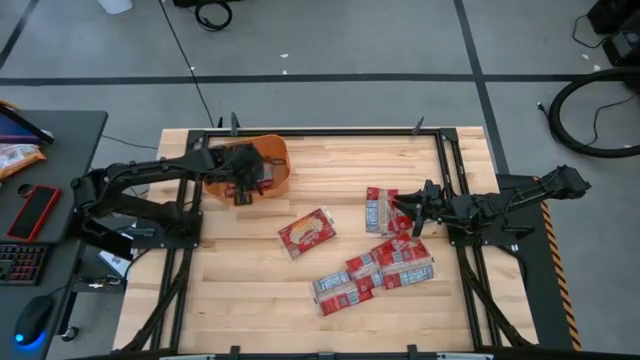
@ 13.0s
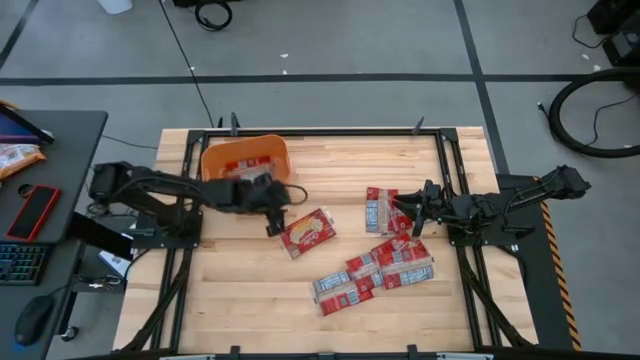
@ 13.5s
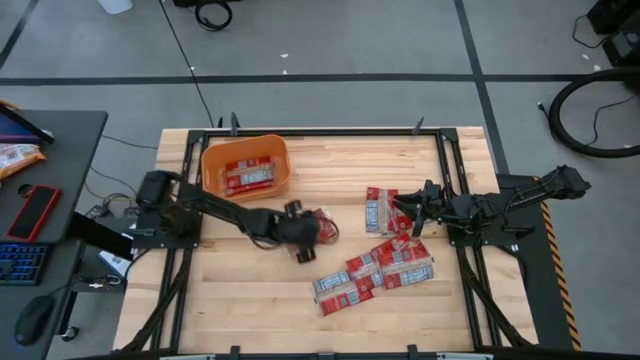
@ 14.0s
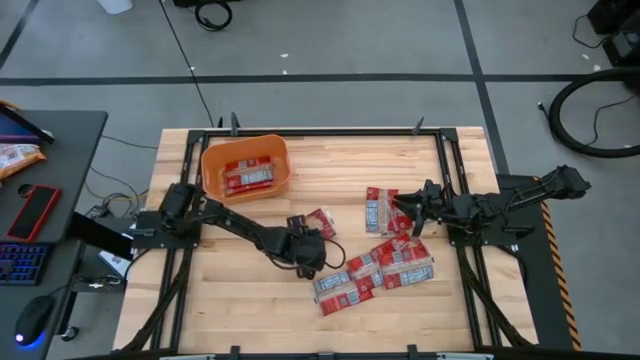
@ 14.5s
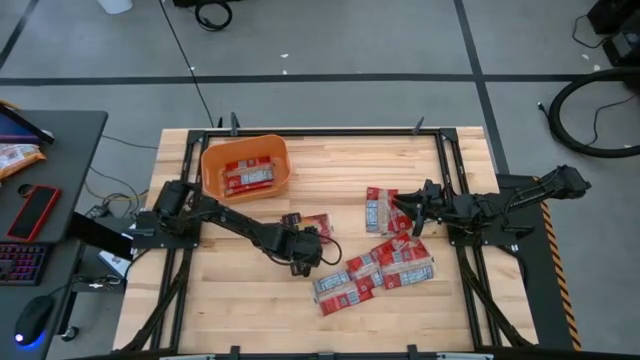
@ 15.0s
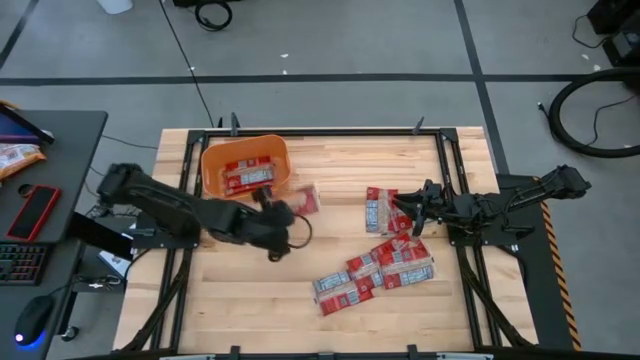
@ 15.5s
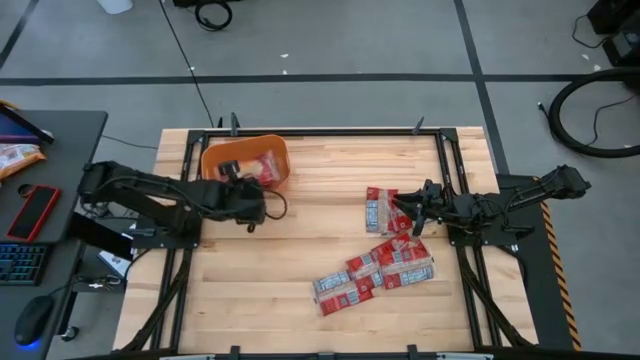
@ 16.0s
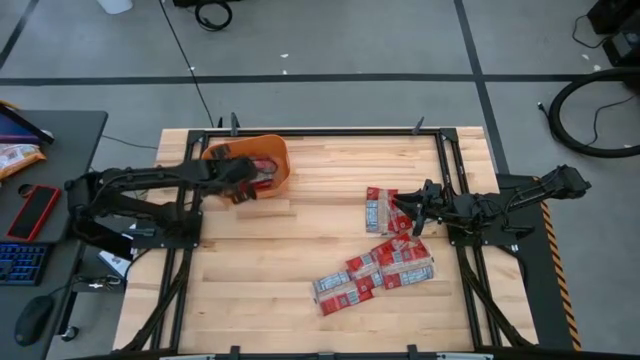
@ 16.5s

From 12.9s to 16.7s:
Task: Sort popcorn bags into baskets
Put the red popcorn bag into the orange bin

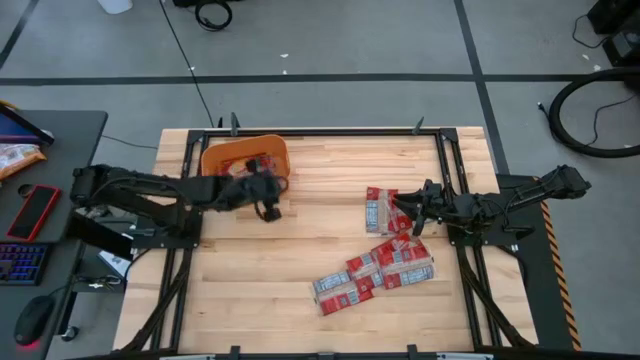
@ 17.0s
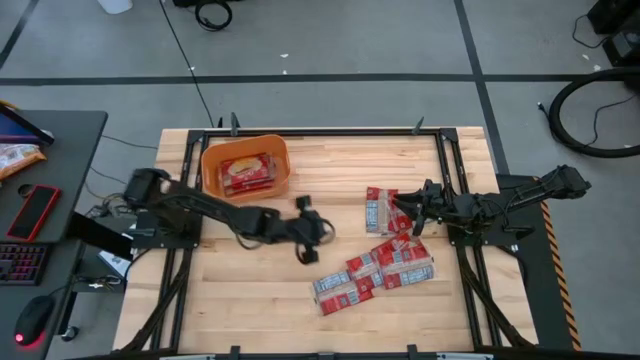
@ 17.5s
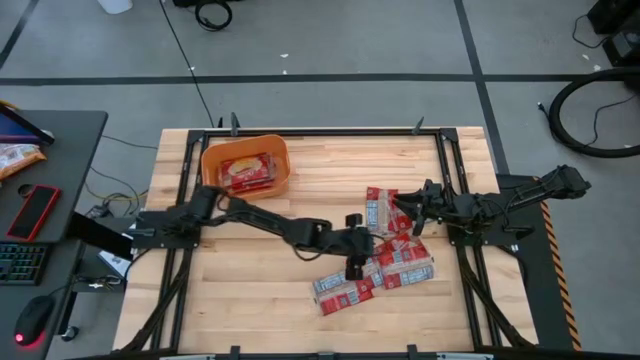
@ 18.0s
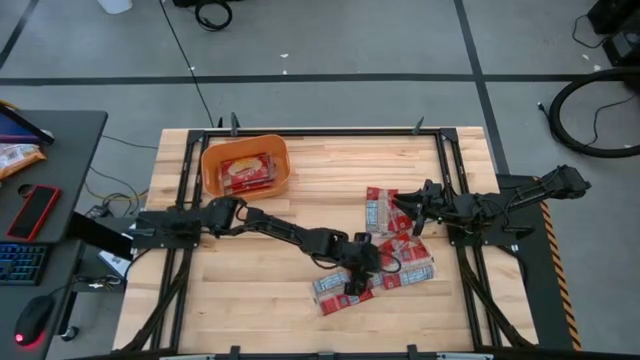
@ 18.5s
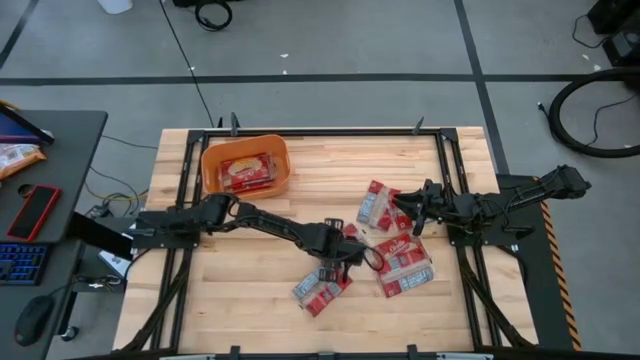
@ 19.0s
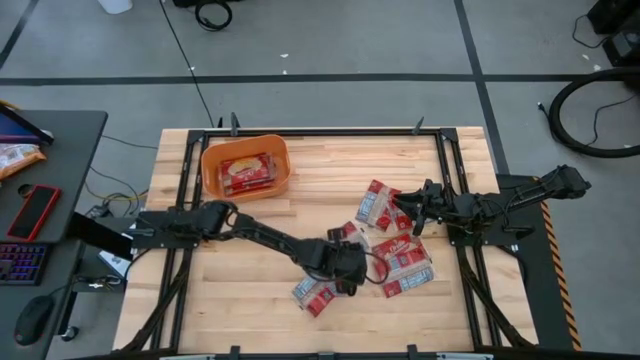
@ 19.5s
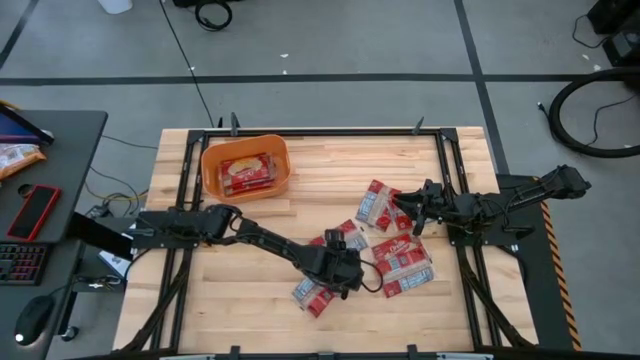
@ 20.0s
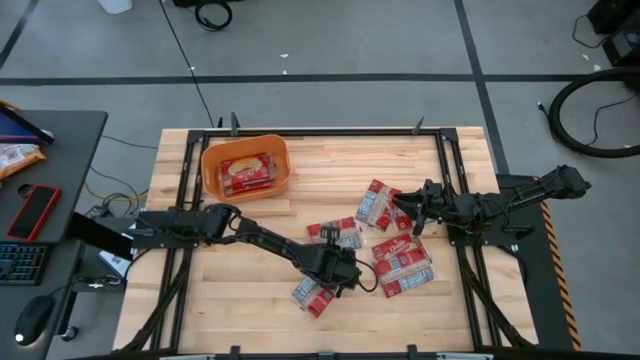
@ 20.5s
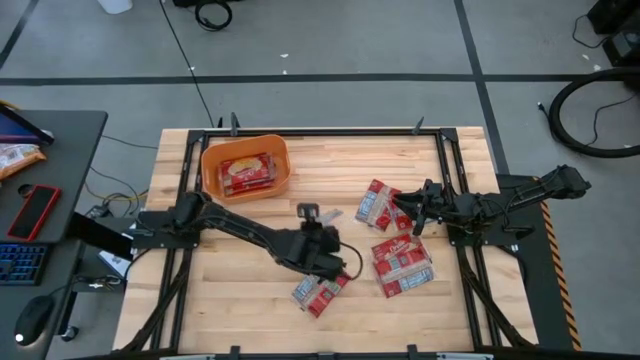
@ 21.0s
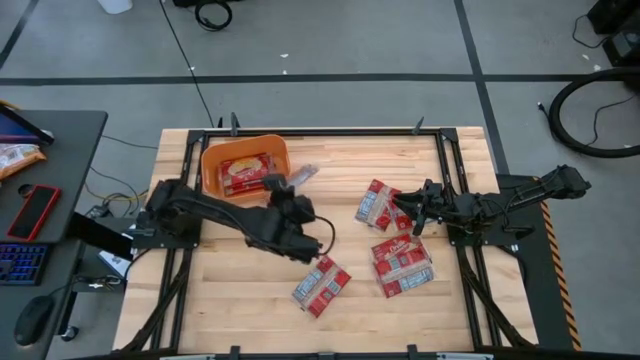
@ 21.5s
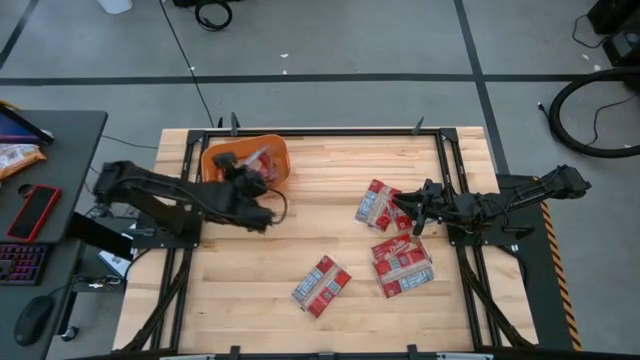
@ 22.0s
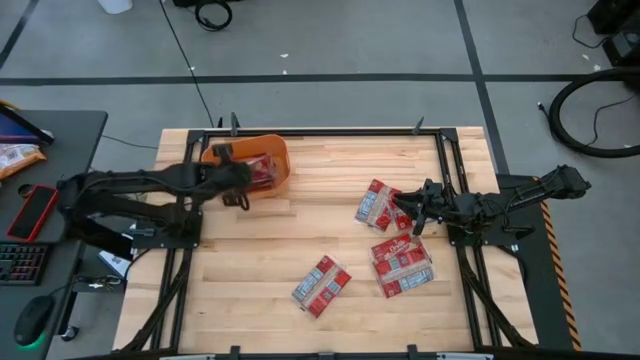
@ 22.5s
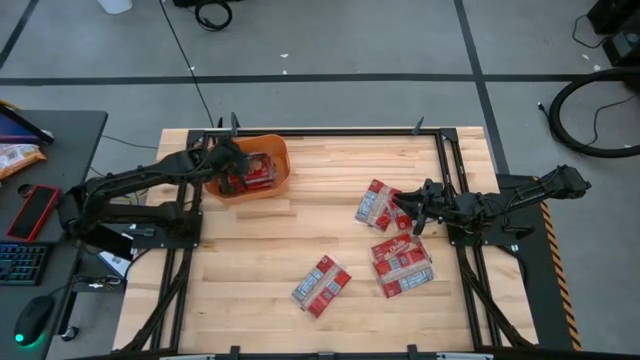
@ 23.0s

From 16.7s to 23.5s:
Put the red popcorn bag into the orange bin

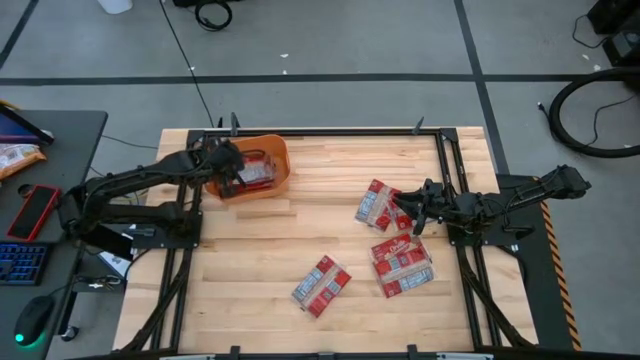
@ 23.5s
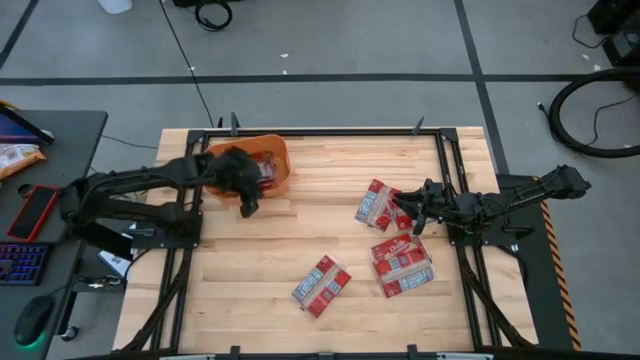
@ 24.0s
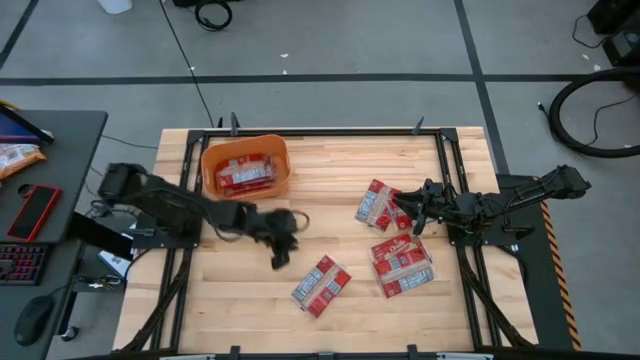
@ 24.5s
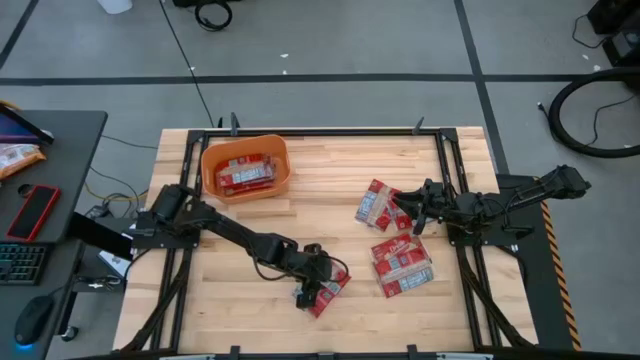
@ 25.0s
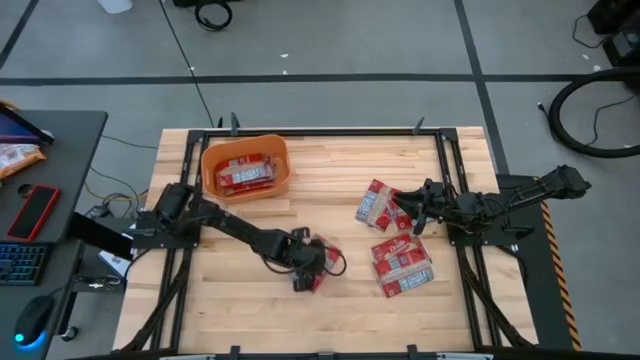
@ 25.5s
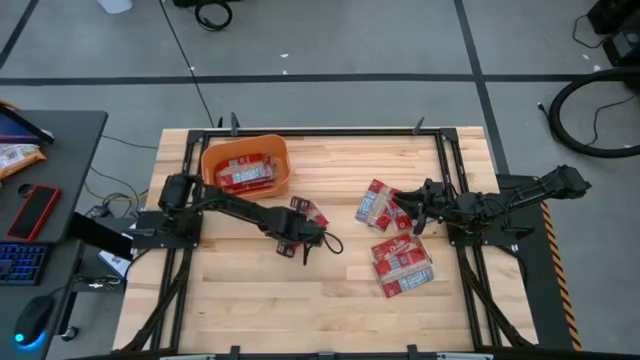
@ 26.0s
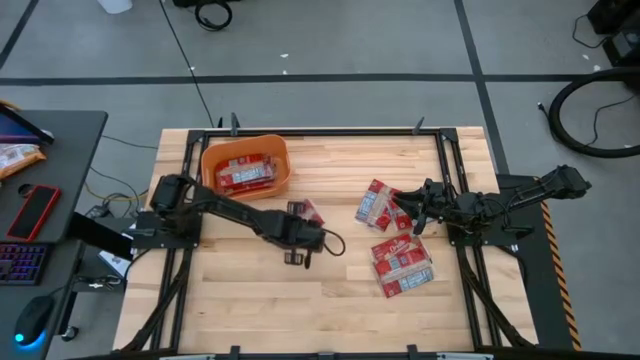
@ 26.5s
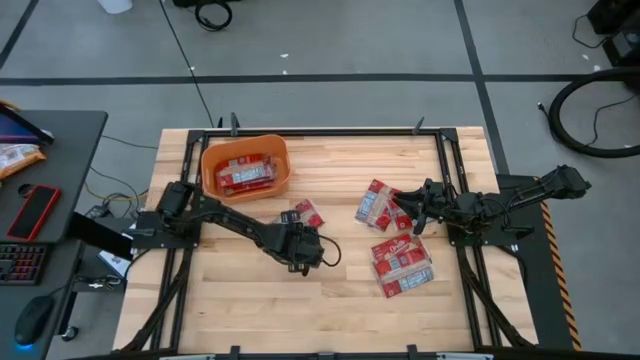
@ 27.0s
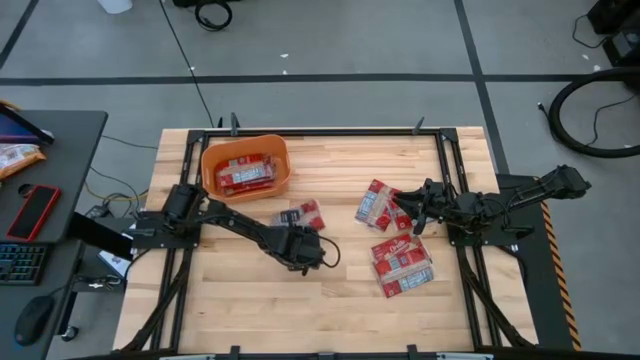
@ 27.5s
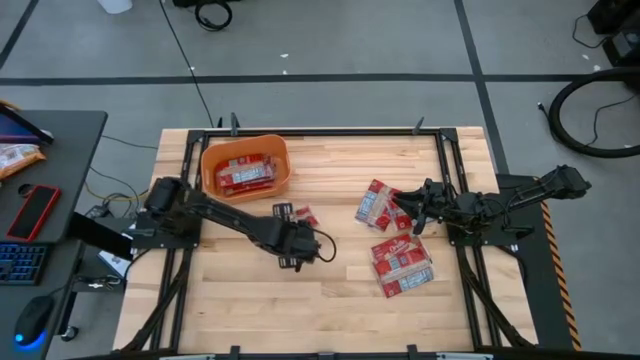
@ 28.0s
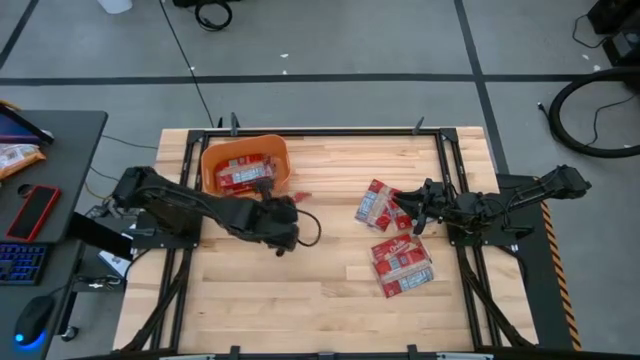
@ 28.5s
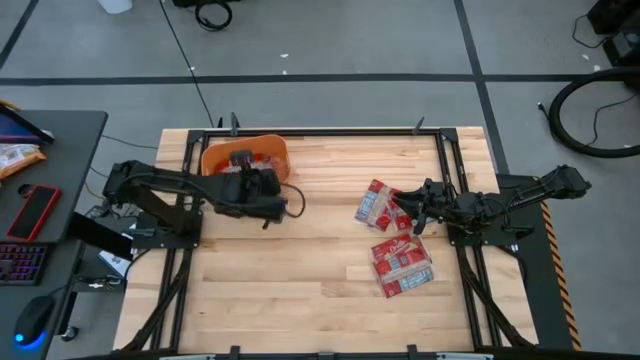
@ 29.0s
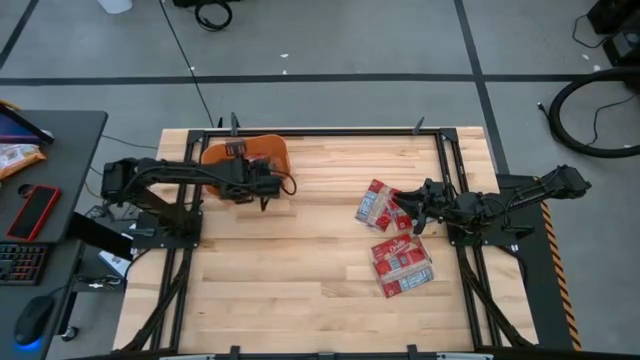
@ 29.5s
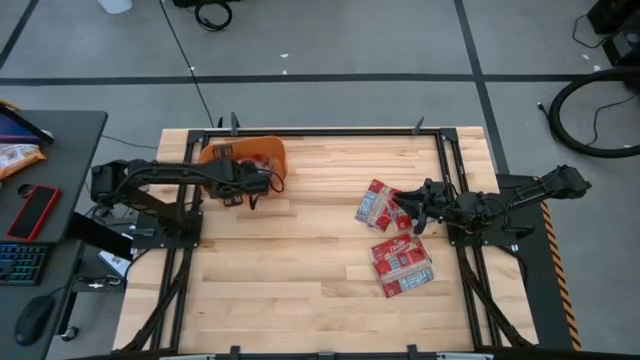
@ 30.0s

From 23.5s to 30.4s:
Put the red popcorn bag into the orange bin

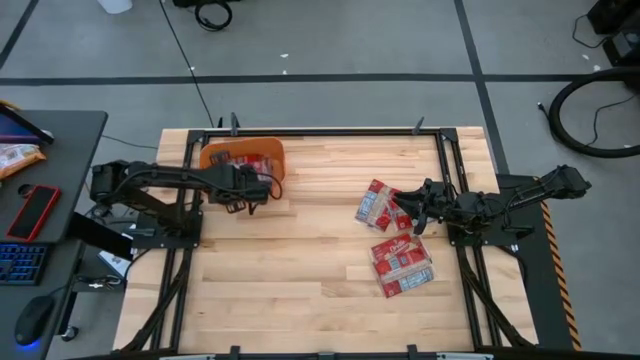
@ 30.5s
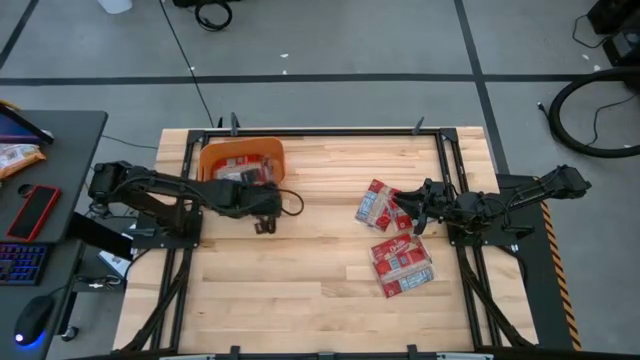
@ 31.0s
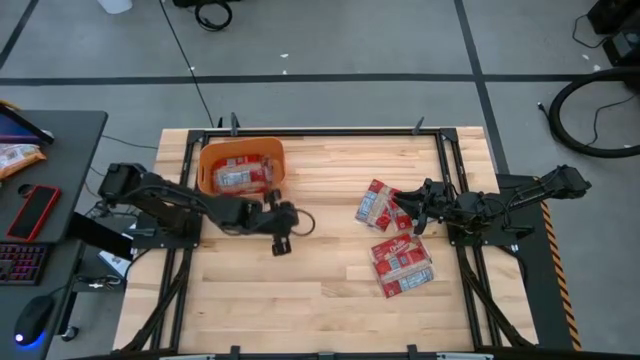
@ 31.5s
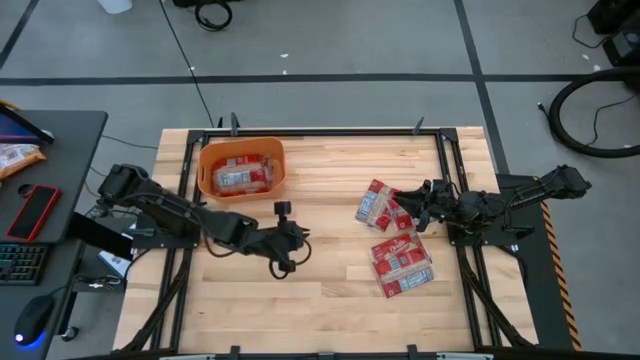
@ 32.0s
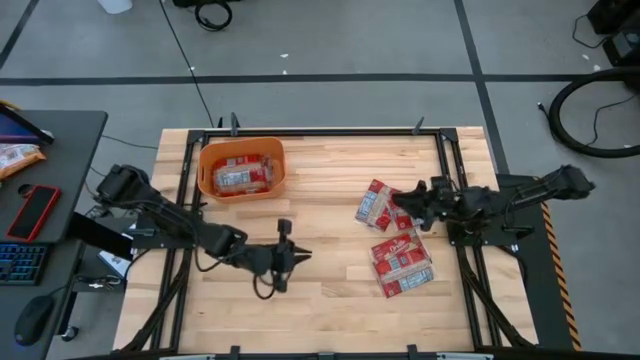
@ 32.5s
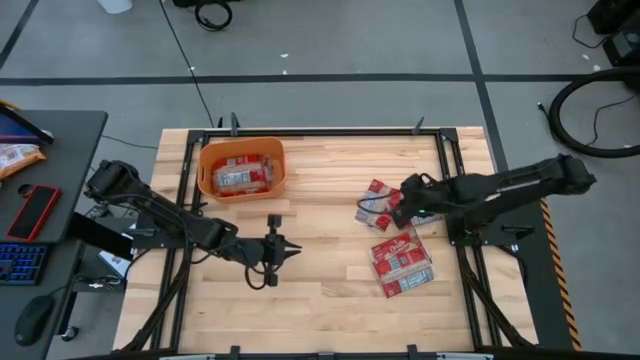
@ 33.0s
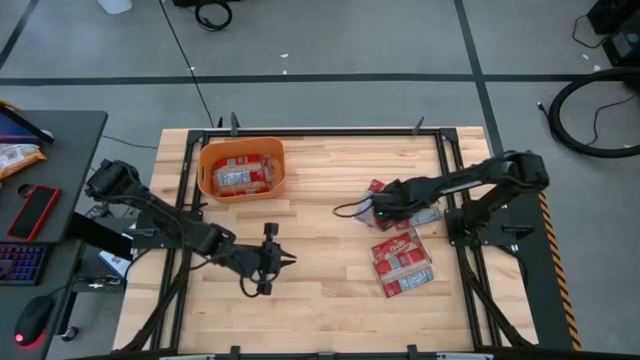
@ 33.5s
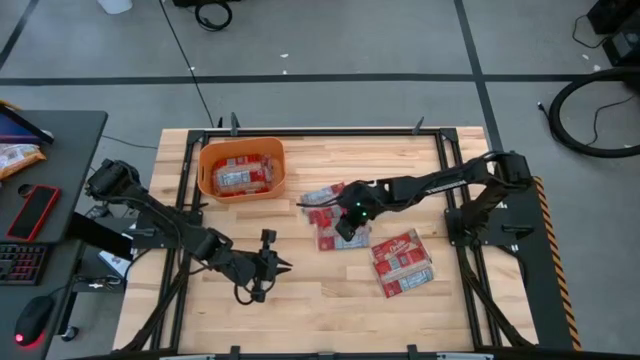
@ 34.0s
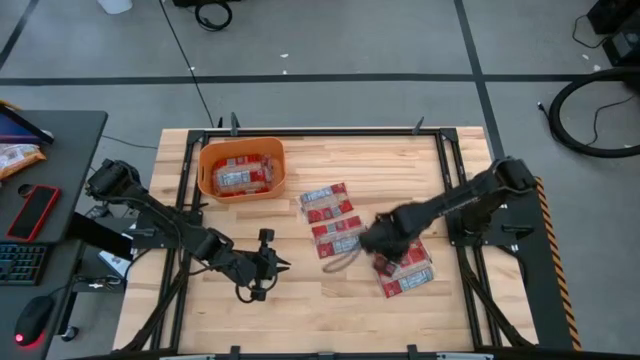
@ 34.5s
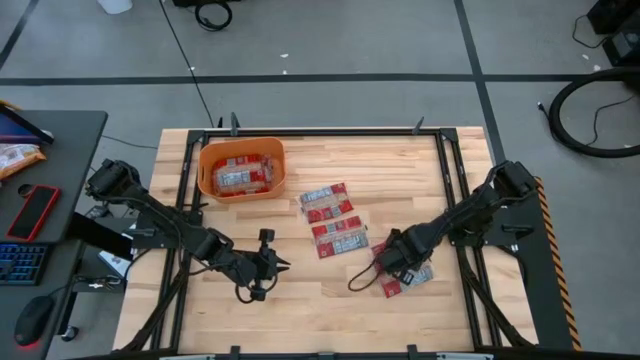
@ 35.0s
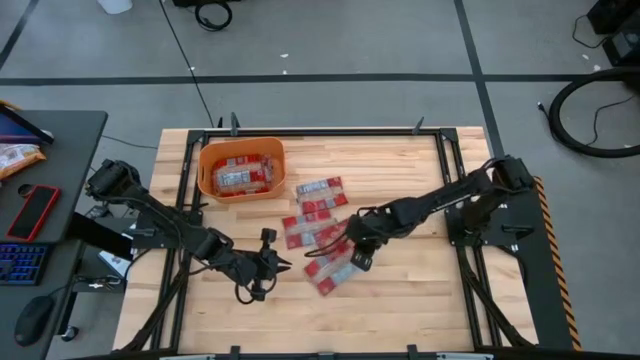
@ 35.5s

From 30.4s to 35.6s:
Move the red popcorn bags to the middle of the table
